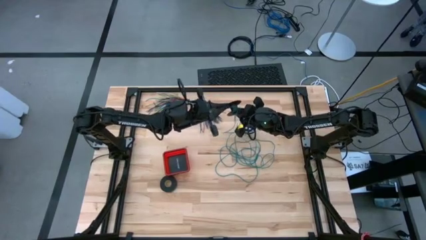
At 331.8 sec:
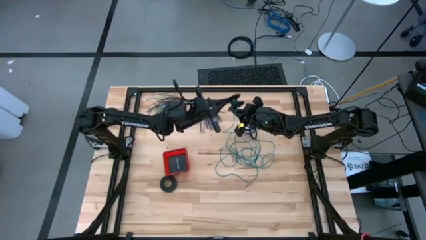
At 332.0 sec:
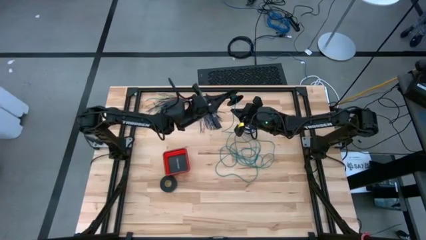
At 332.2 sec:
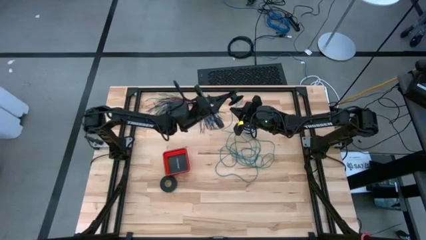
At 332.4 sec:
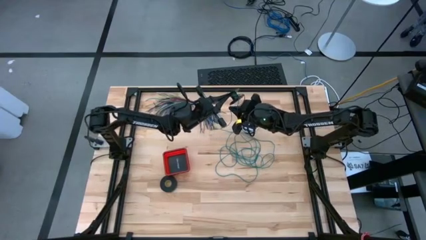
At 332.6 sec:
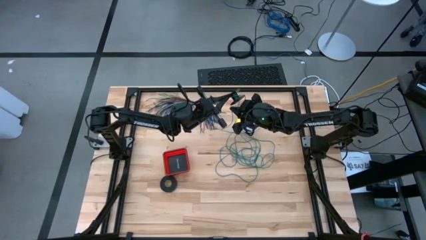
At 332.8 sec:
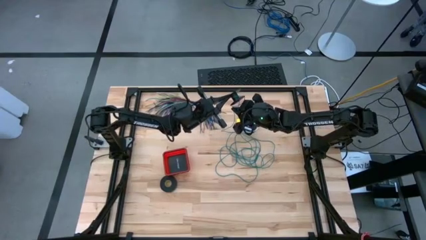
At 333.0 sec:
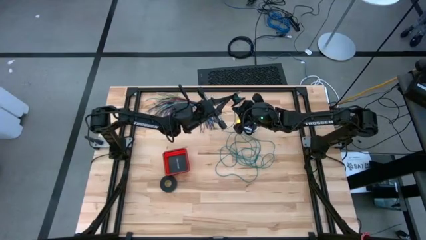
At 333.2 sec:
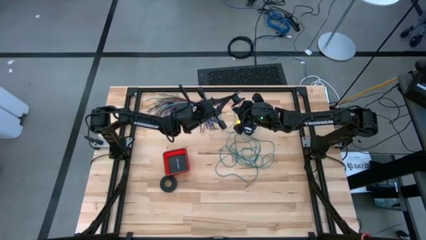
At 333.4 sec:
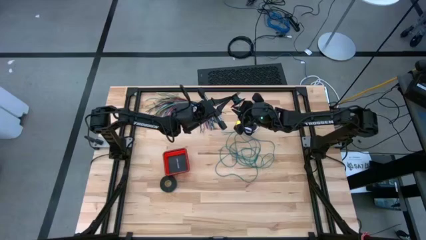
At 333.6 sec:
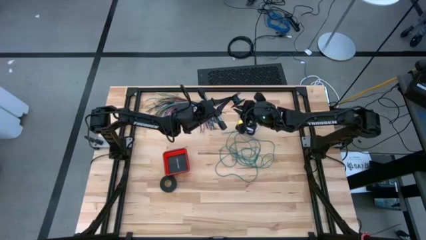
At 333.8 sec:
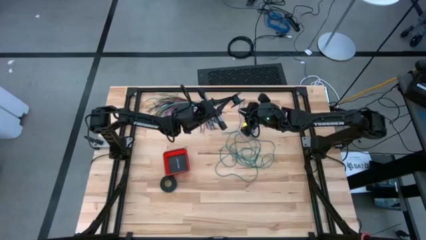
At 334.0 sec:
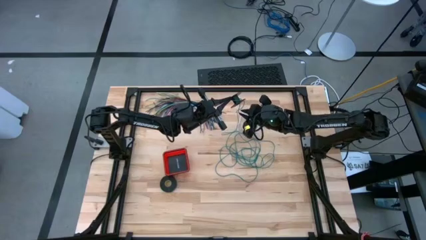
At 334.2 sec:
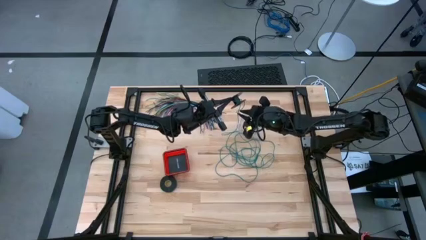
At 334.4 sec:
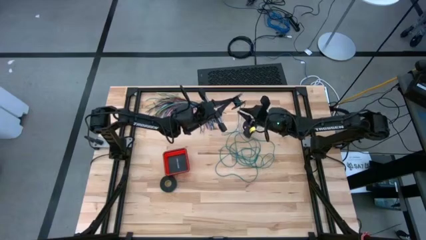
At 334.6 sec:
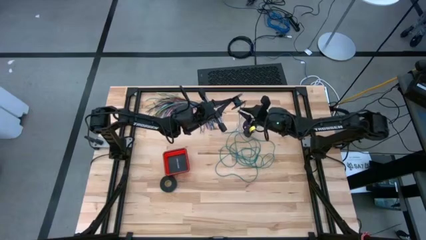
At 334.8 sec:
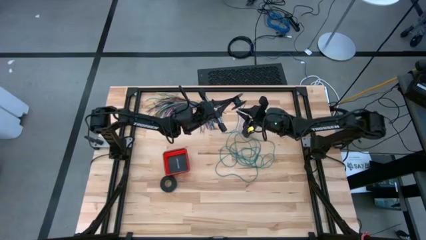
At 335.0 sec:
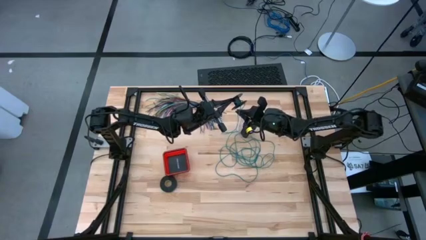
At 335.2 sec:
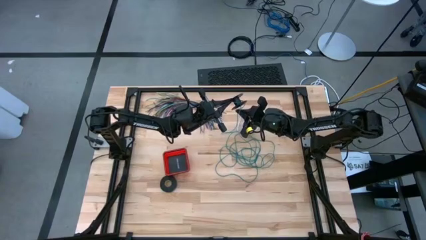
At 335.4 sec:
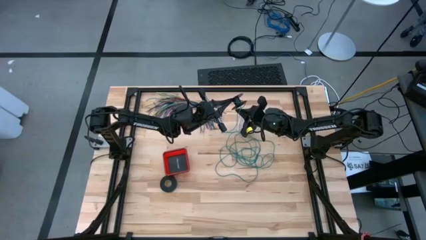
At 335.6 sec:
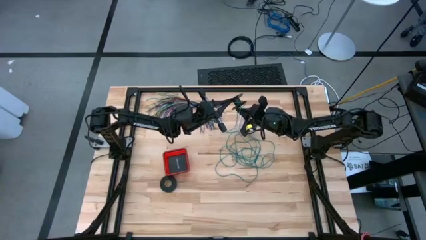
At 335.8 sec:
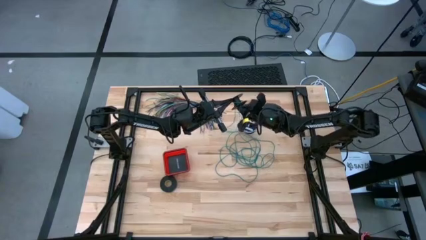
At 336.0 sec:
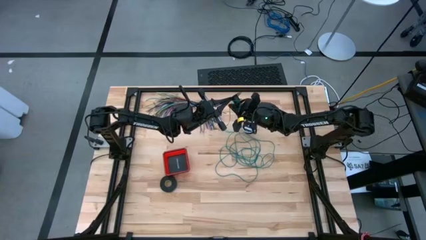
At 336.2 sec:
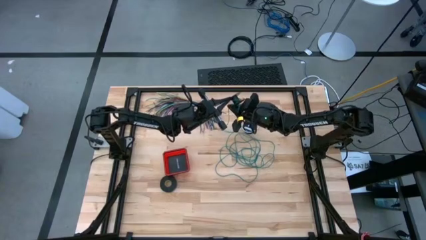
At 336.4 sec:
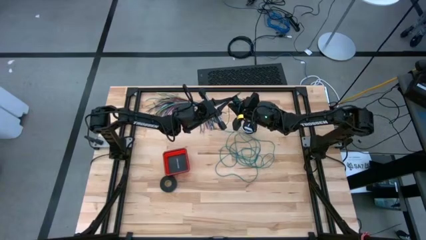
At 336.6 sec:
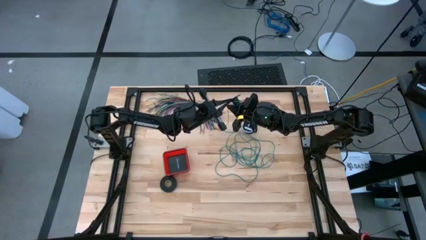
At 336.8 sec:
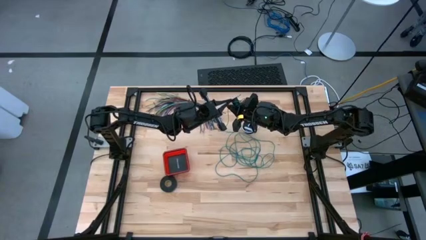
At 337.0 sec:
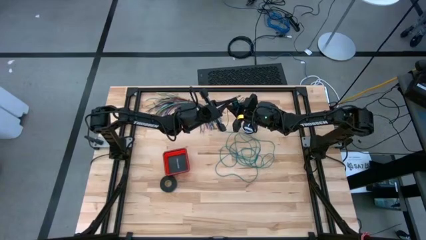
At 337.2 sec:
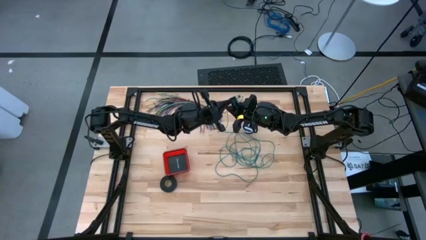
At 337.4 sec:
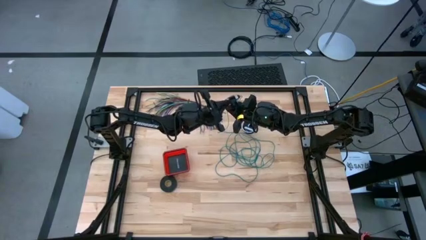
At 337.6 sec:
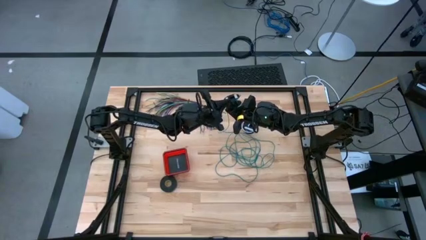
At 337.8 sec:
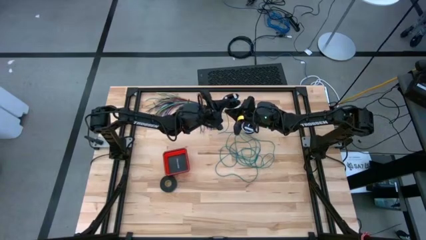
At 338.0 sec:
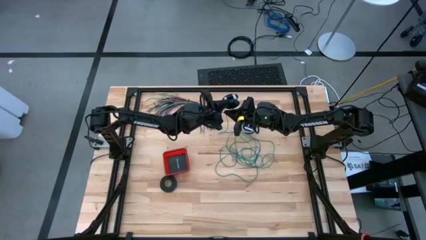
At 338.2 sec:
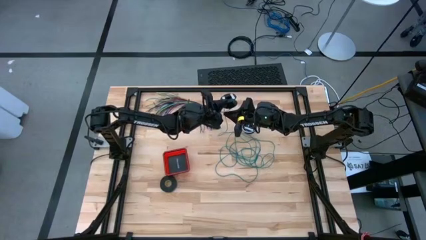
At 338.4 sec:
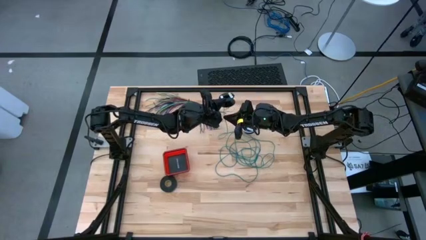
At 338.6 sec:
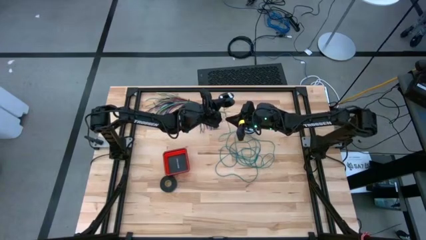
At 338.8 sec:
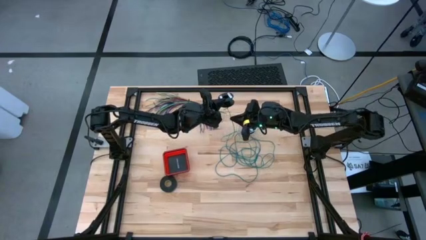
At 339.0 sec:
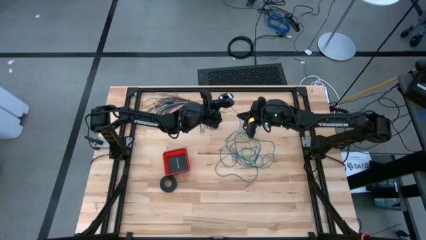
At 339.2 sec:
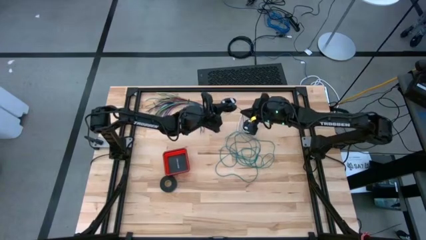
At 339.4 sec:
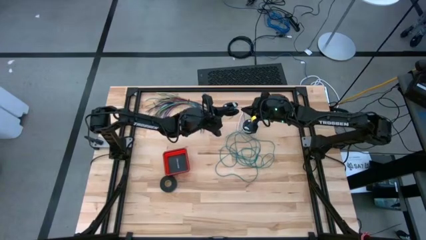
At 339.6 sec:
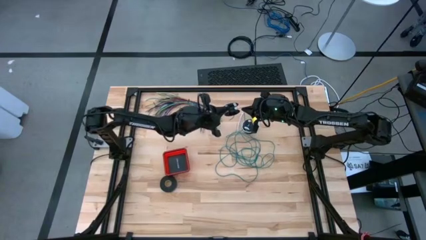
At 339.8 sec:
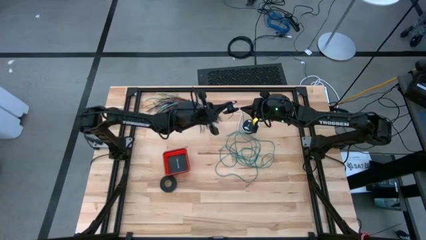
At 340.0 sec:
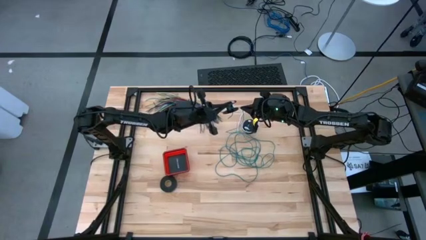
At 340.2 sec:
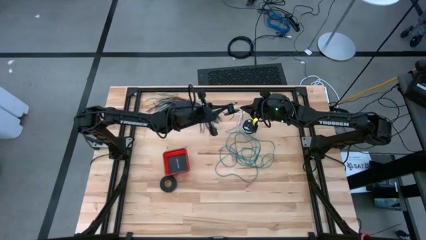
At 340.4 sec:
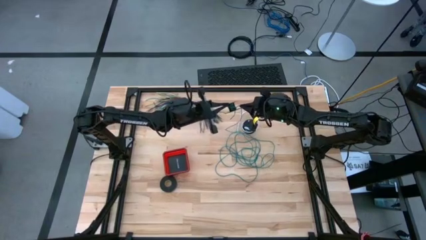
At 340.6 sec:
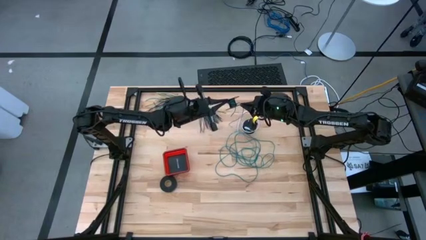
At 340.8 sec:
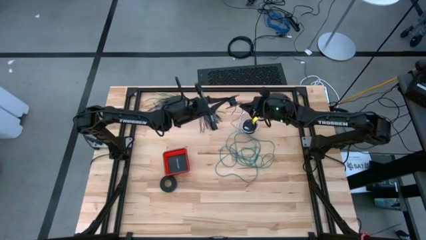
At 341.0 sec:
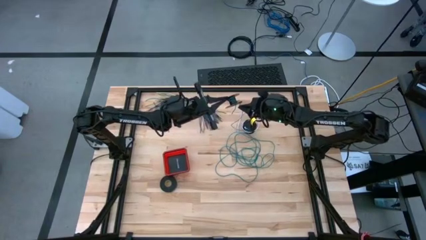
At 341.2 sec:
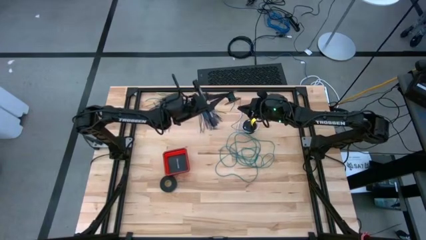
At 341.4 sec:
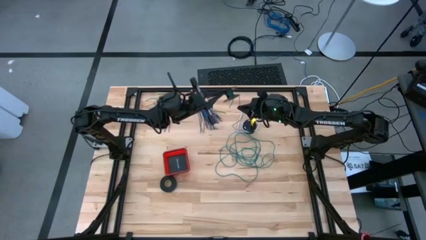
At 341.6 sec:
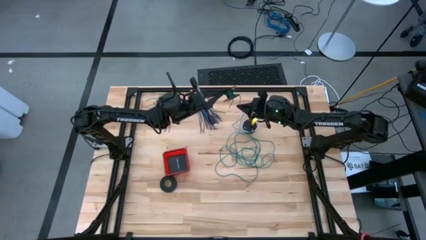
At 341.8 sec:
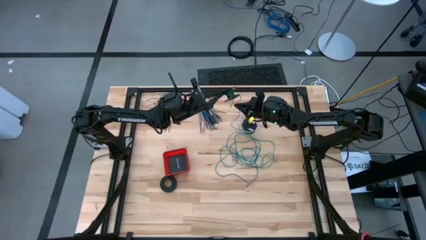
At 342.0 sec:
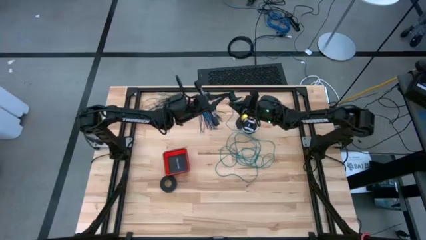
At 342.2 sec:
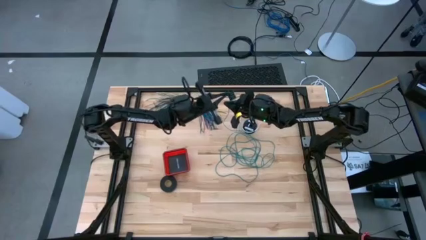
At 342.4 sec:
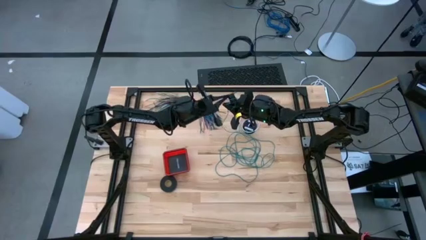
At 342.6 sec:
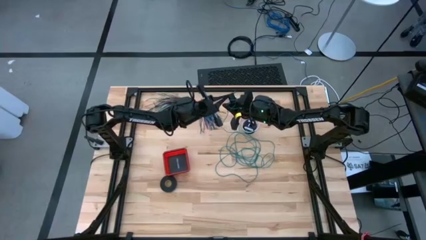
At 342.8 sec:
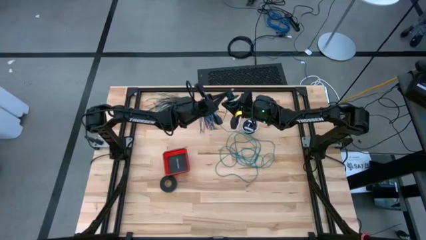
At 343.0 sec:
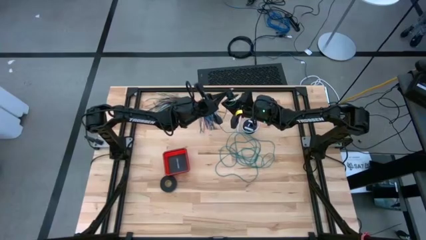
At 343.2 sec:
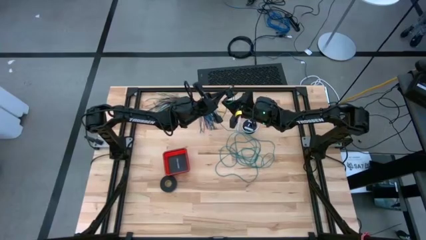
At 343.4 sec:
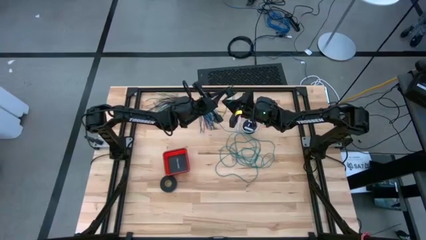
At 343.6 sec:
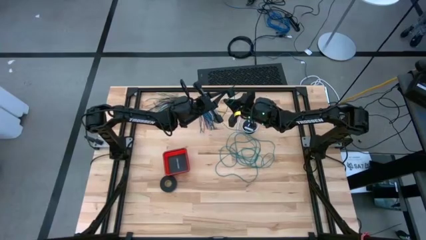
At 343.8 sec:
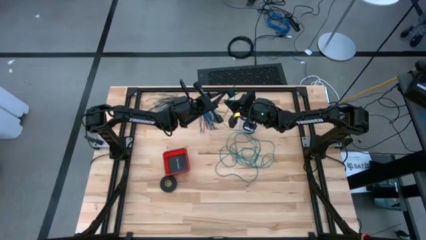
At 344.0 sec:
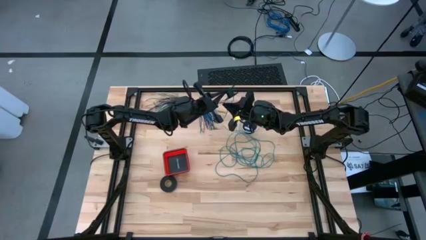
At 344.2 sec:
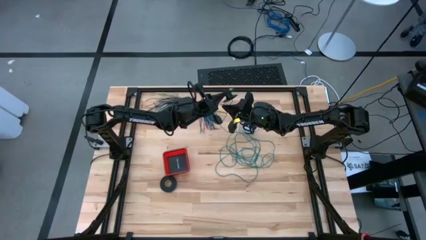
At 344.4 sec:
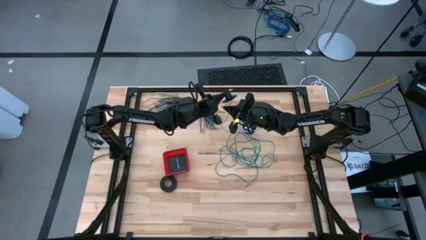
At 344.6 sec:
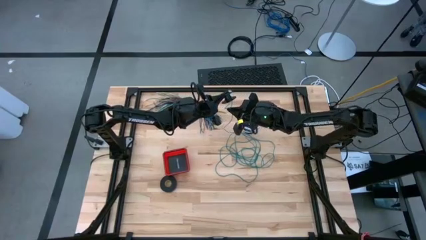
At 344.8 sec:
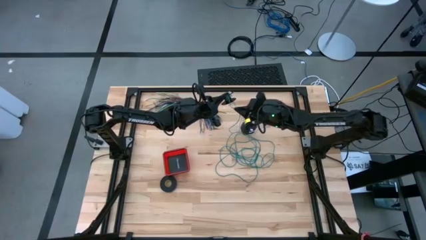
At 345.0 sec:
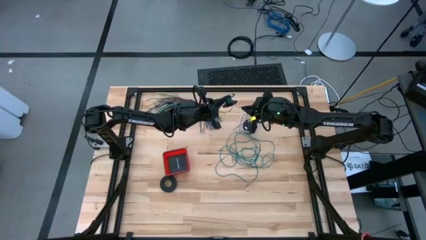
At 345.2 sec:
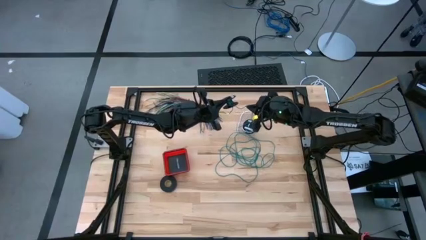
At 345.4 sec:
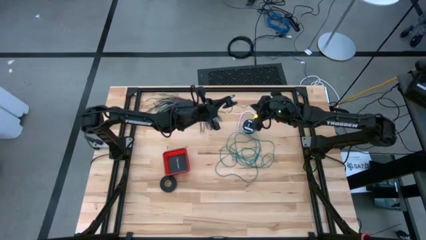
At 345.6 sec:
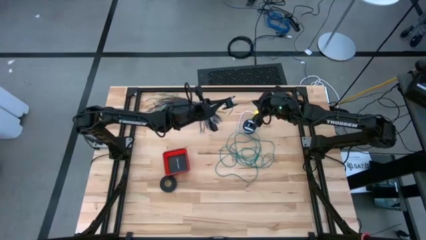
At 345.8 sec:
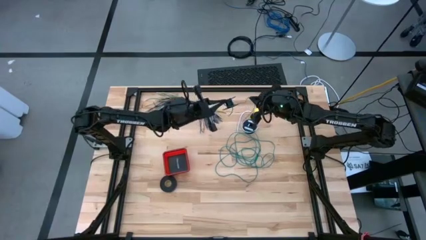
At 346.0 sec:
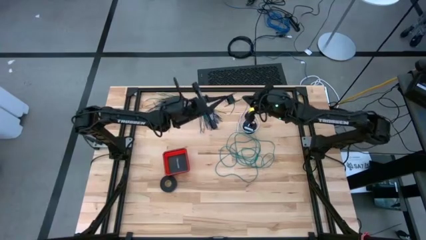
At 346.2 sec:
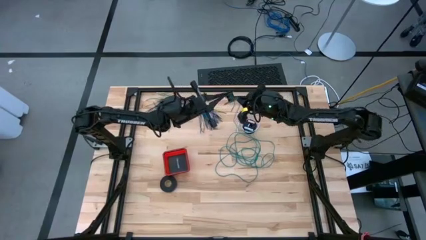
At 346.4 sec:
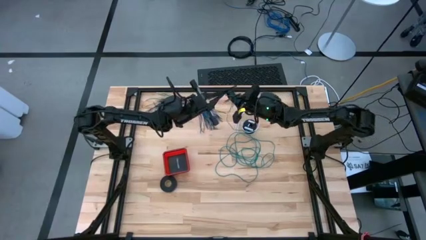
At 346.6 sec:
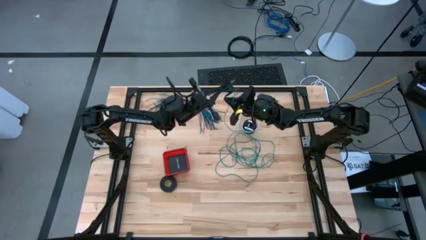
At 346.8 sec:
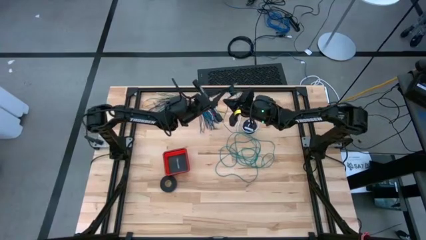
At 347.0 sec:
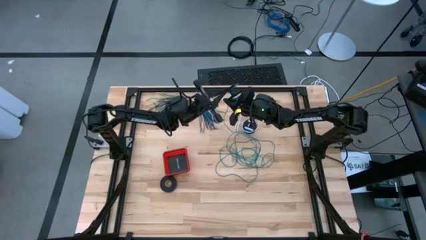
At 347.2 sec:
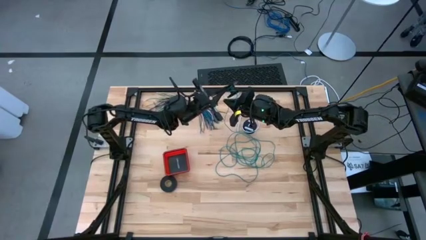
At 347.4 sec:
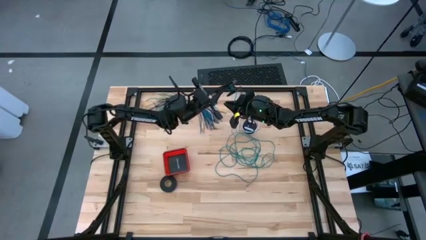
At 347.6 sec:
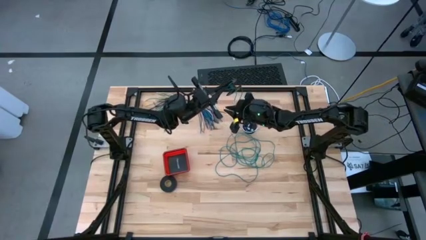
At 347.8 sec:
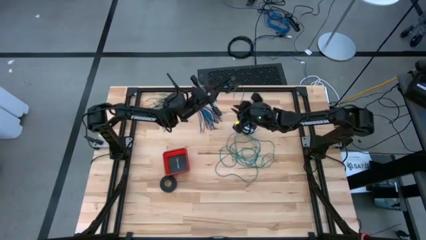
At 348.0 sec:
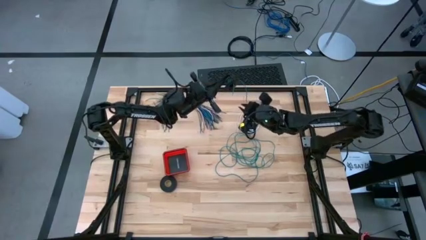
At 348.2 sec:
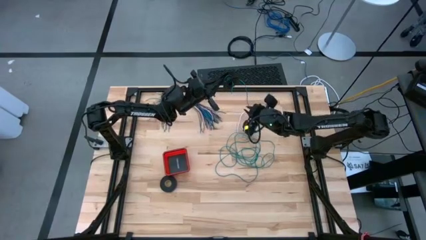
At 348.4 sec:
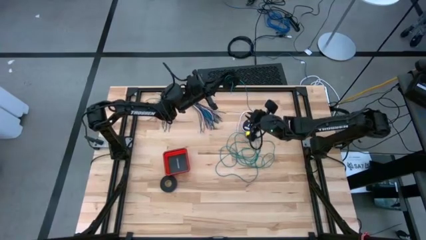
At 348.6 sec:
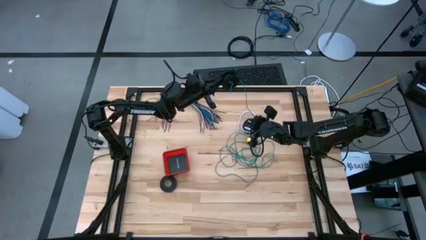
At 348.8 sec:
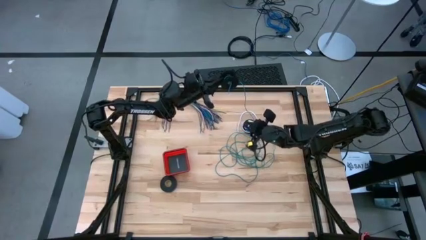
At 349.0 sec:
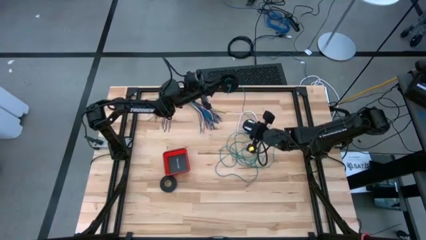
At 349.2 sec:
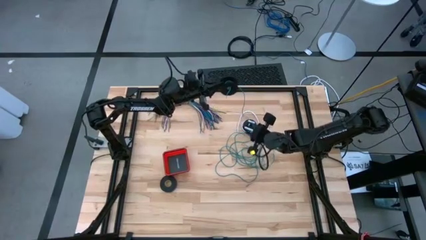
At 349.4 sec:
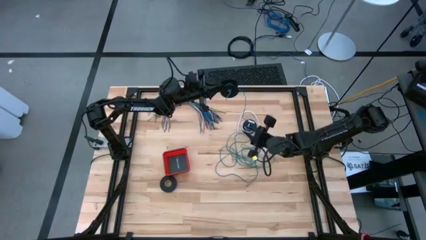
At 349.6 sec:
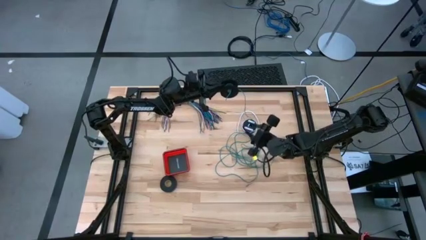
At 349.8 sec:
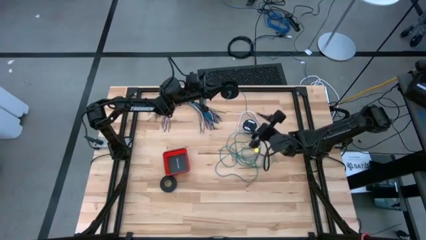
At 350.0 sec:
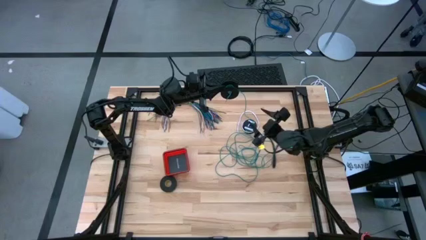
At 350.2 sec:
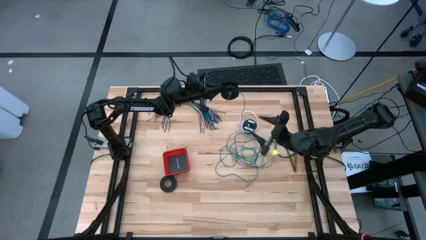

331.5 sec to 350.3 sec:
Task: Coil cords
Coil the green wire onto the spool
